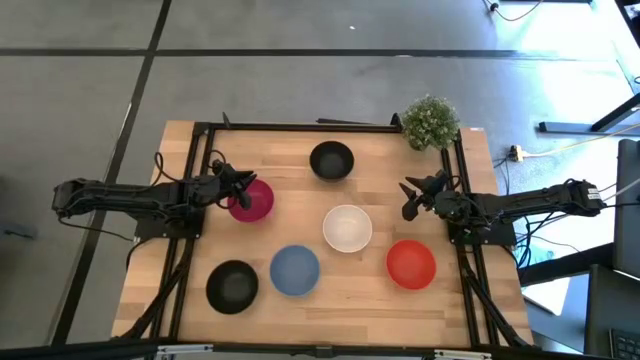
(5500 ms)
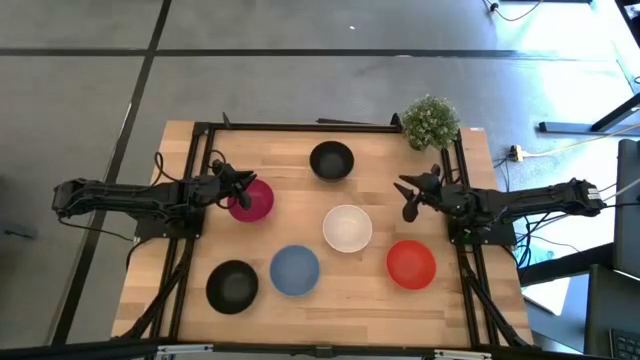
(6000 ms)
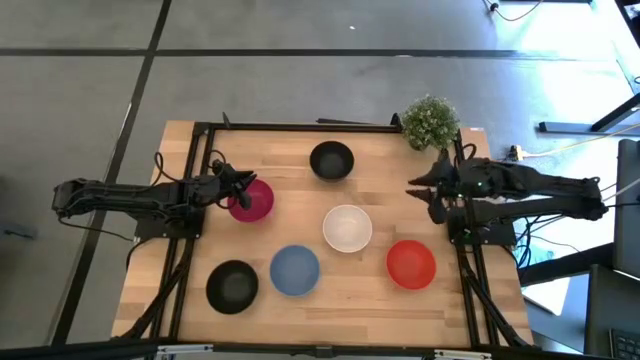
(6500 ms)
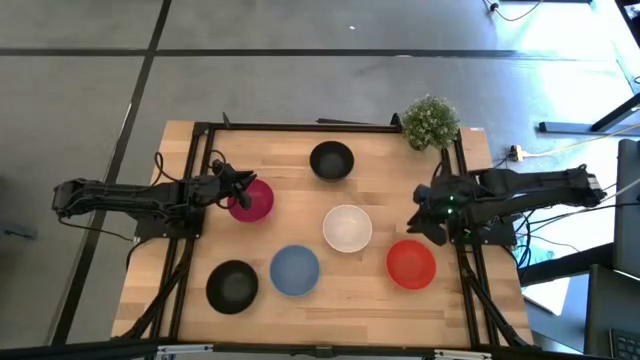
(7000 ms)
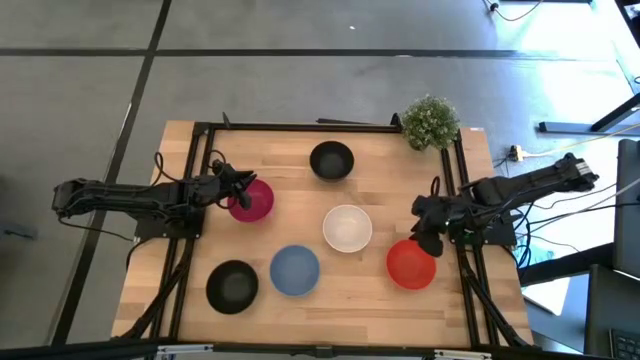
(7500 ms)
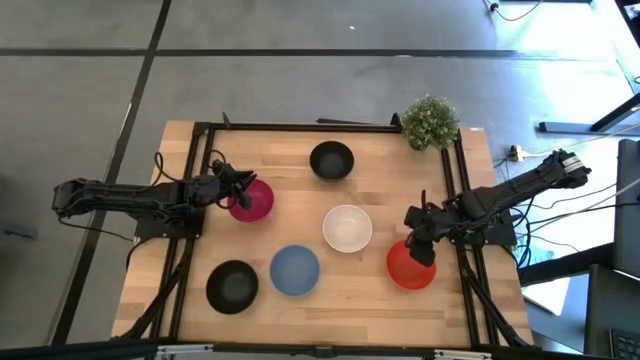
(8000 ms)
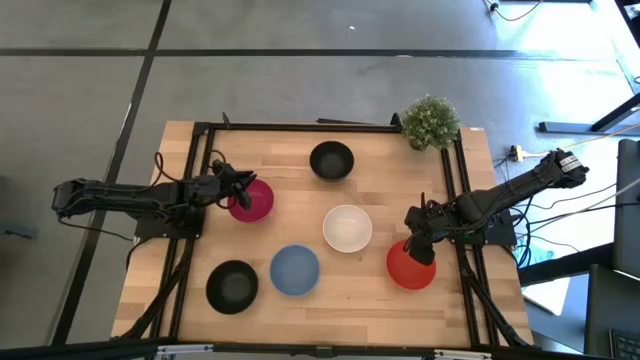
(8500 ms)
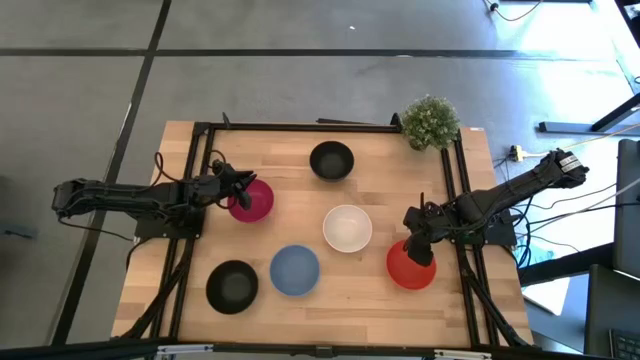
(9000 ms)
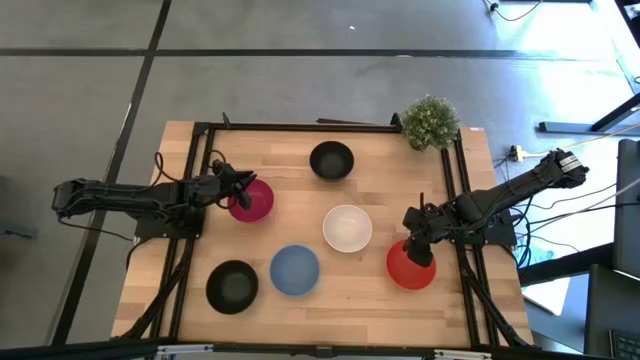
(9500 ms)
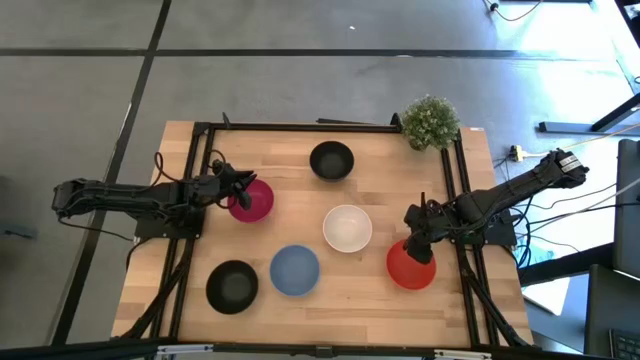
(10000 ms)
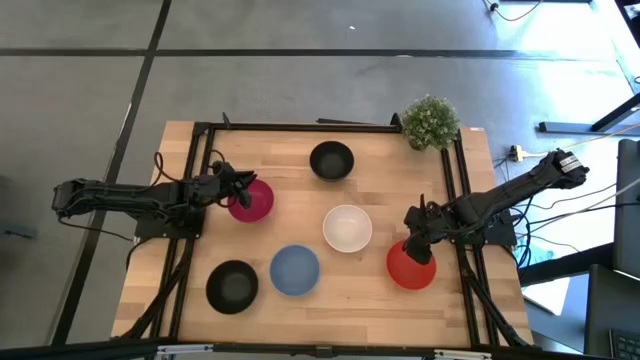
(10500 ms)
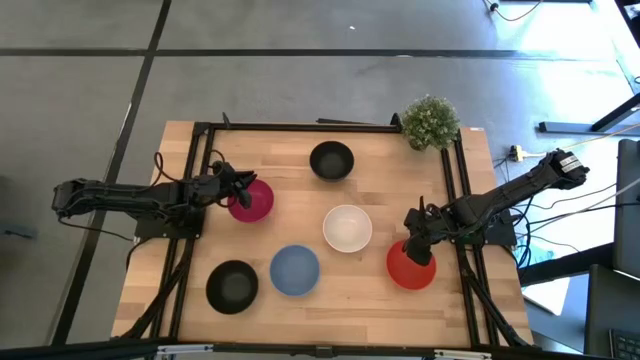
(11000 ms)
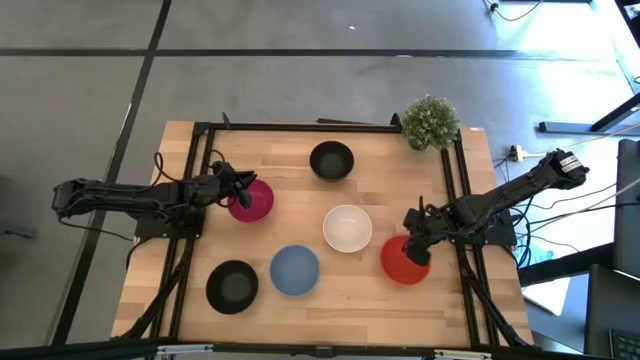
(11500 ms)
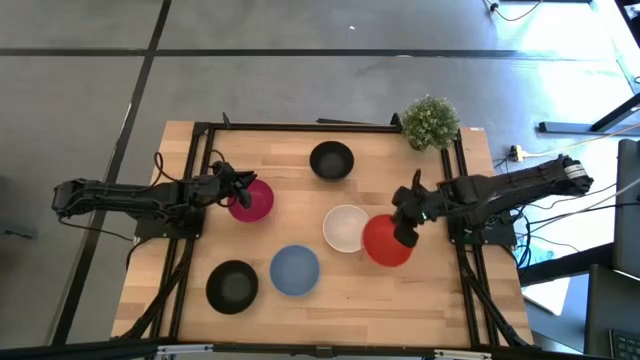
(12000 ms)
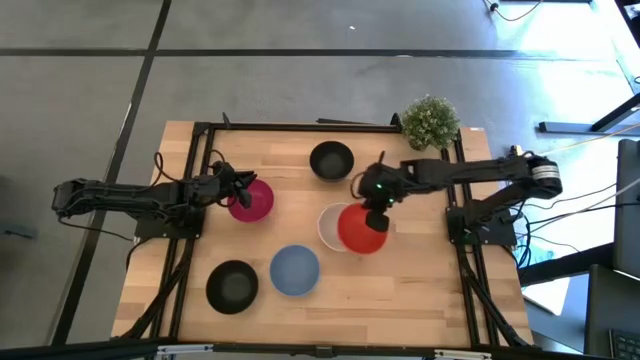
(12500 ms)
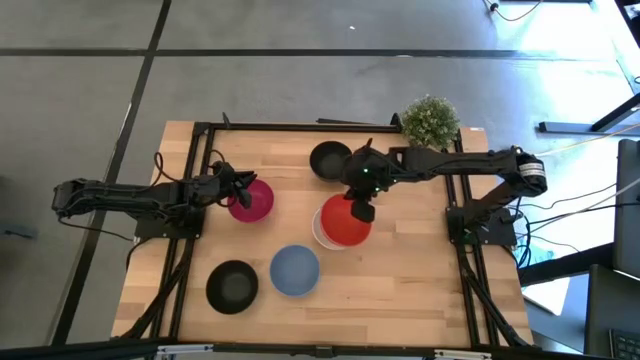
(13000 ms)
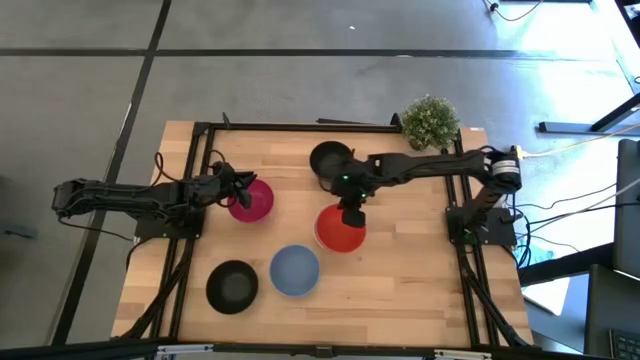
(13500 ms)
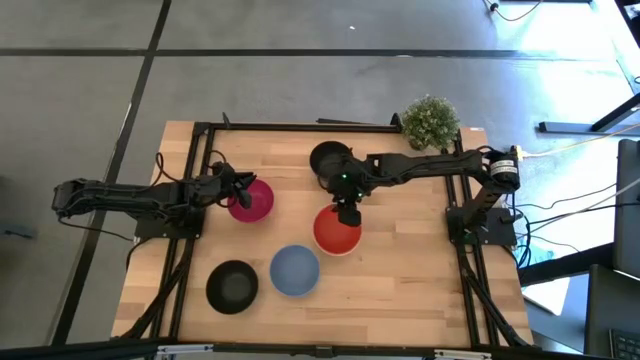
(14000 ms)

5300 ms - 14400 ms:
Task: Nest bowls inside each other
Stack the orange bowl on top of the white bowl

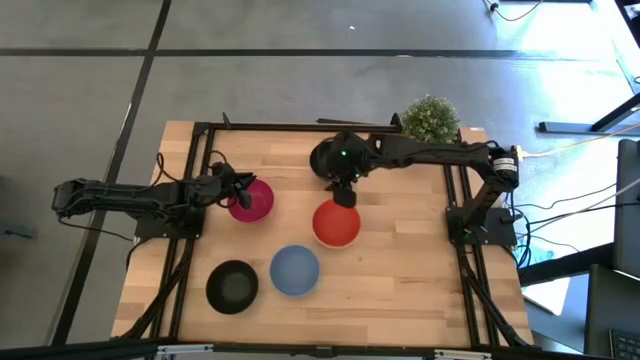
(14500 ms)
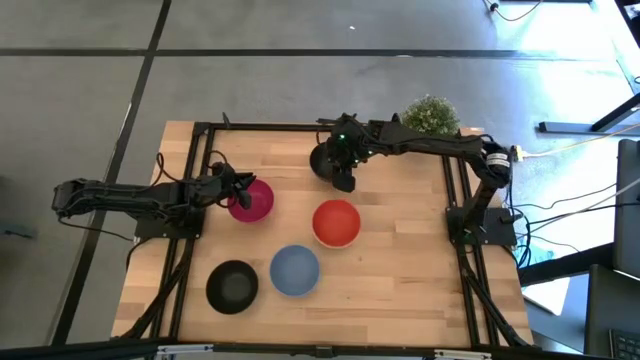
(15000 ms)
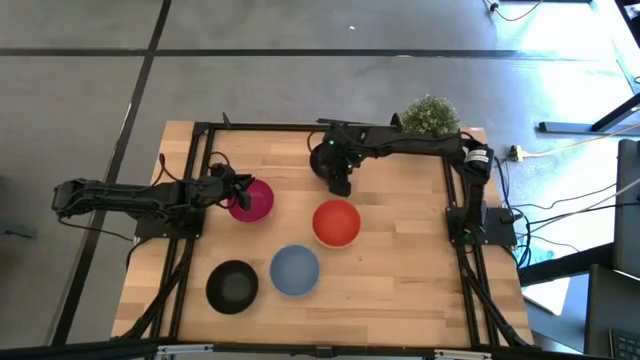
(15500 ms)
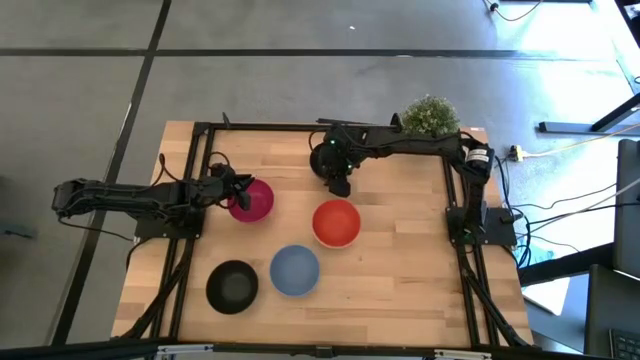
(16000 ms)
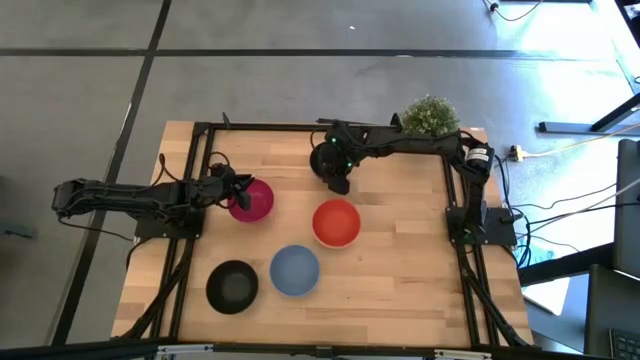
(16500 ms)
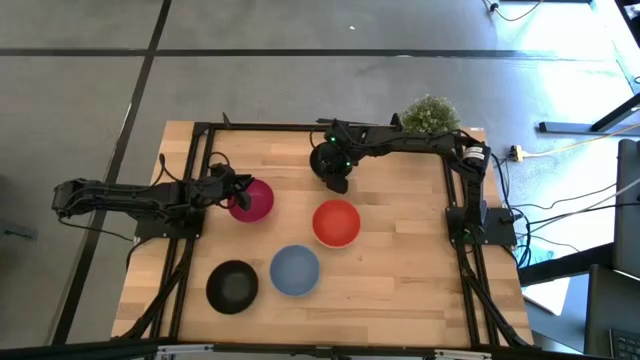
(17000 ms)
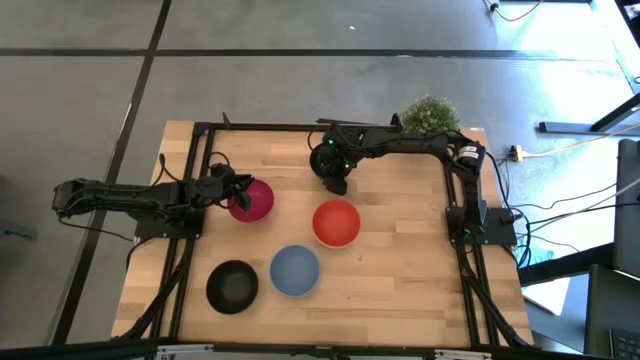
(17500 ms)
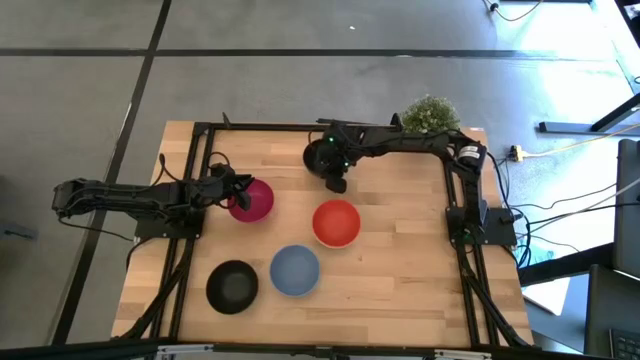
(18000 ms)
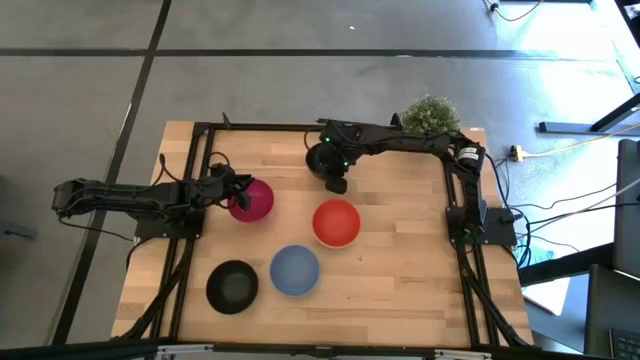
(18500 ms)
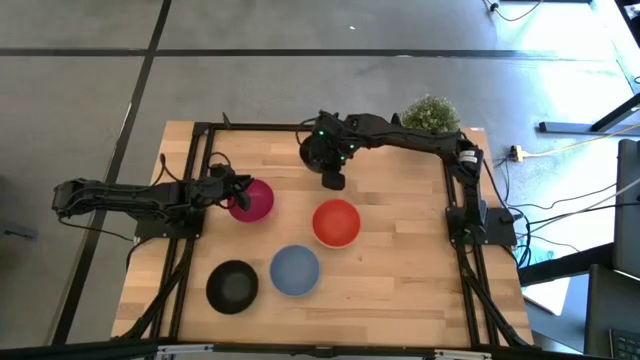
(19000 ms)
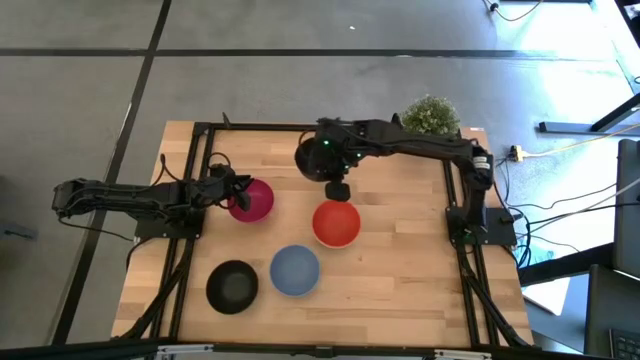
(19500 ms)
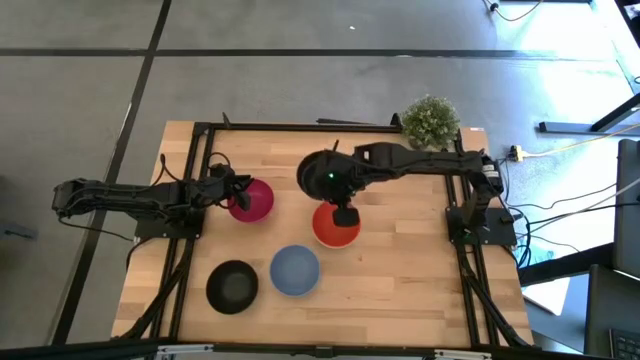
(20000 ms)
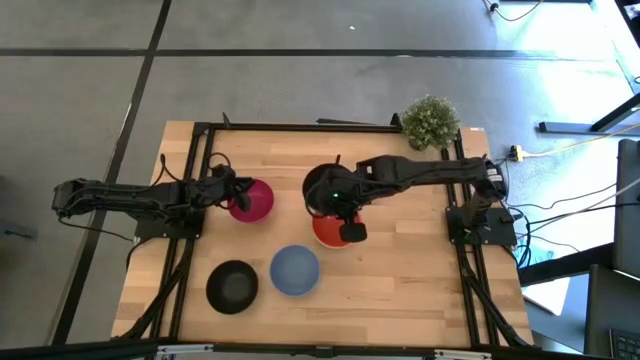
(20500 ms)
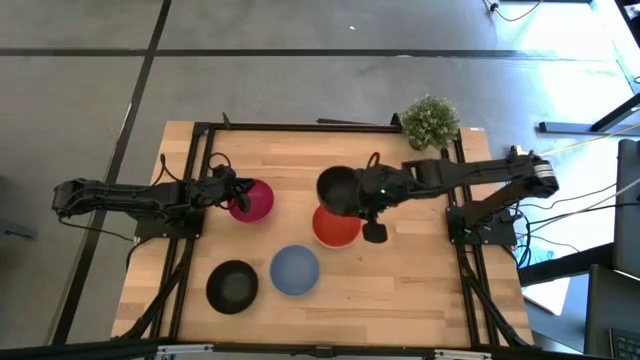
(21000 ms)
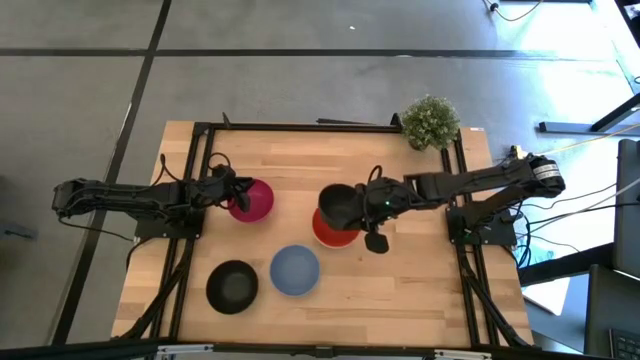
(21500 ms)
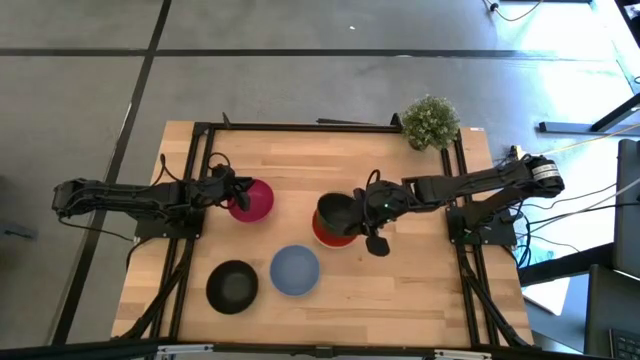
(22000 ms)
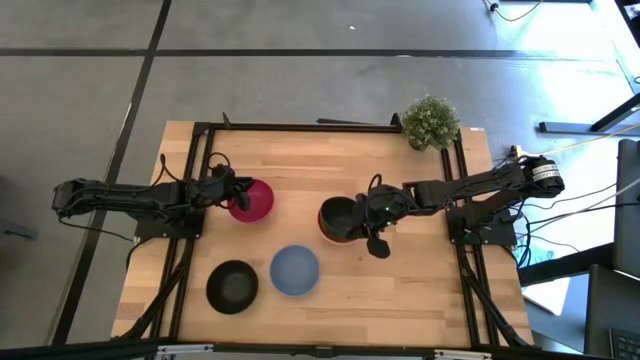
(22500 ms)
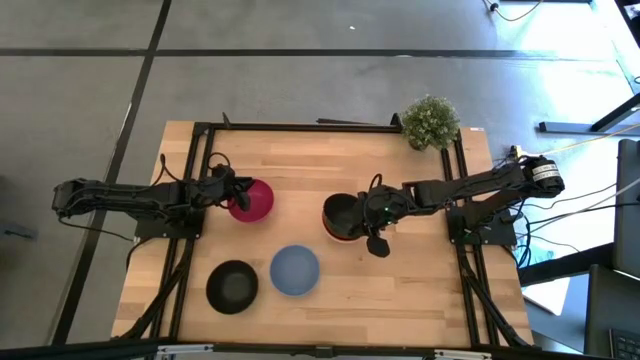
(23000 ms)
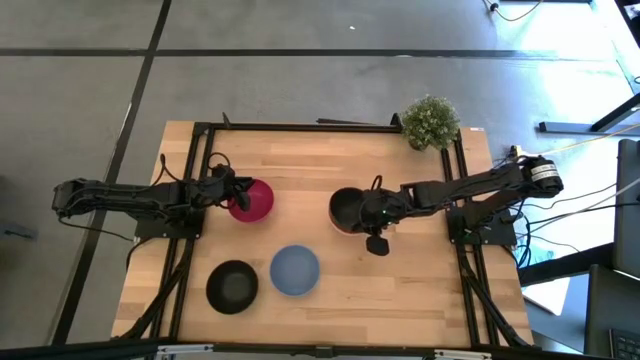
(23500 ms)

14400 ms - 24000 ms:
Stack the top black bowl on top of the orange bowl

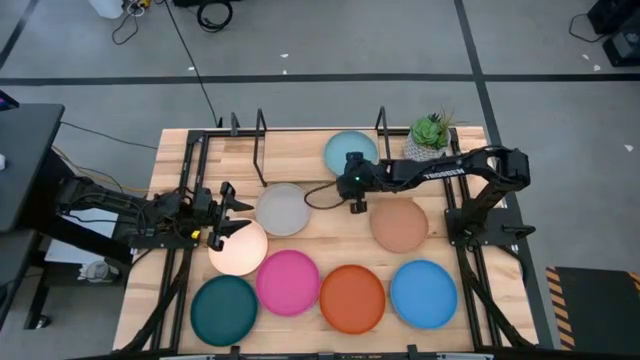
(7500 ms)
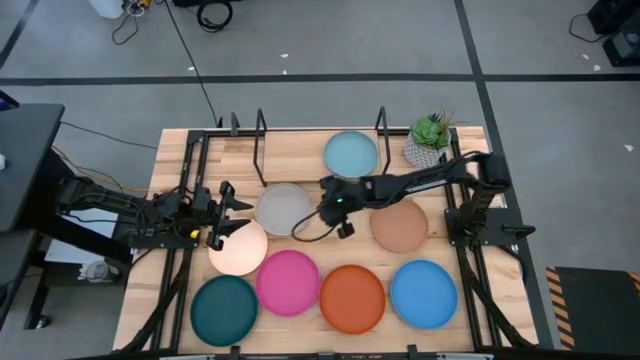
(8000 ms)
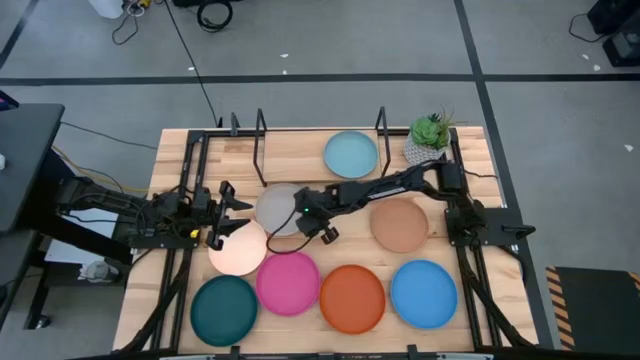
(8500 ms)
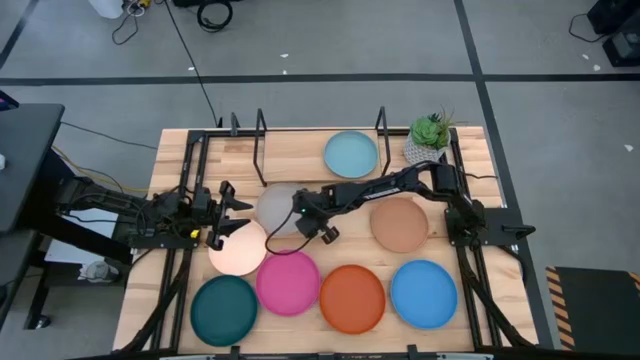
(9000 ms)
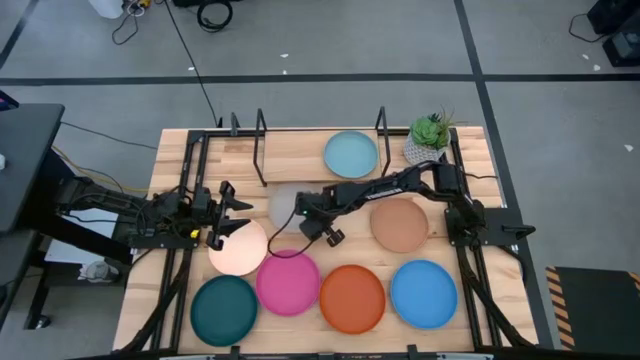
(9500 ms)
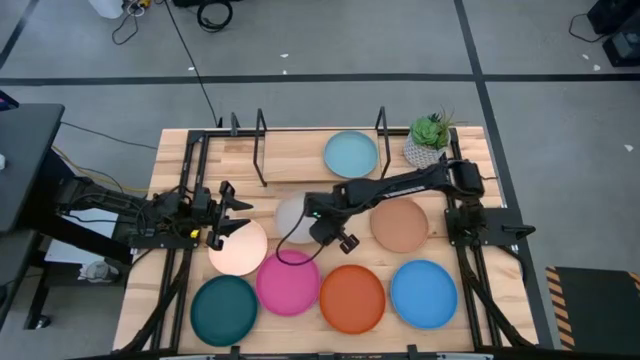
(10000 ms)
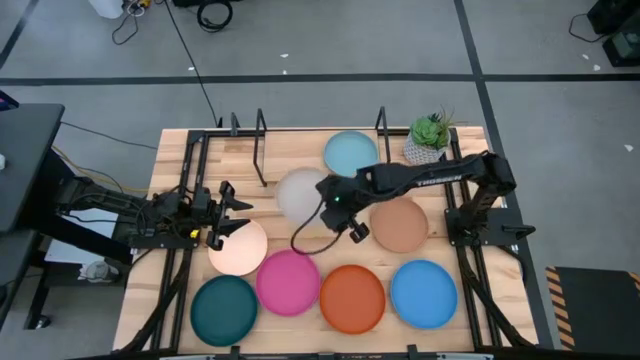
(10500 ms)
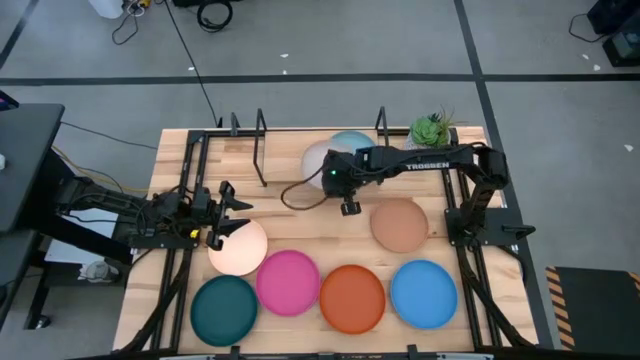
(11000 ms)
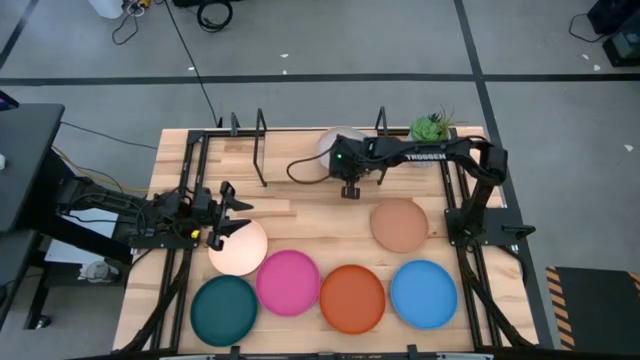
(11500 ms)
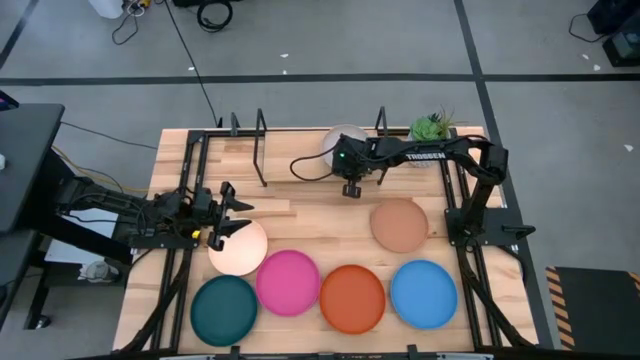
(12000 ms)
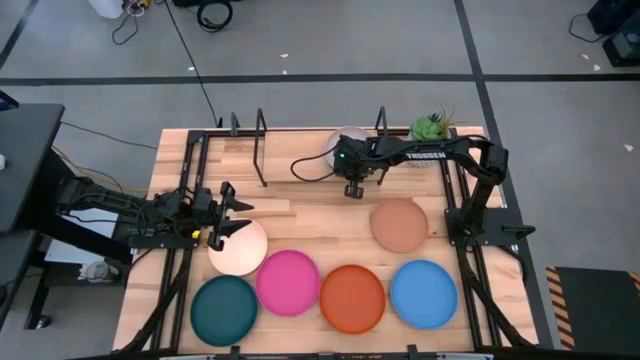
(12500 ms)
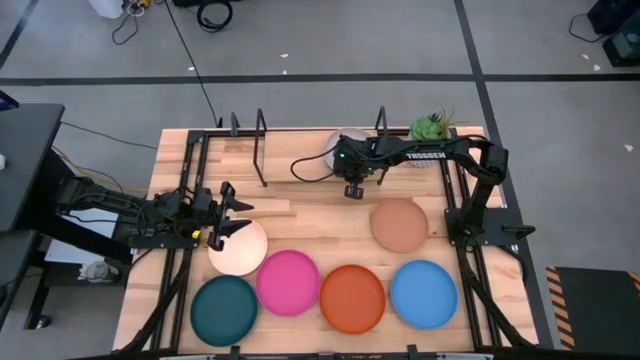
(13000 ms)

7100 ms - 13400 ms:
Task: Place and stack plates onto a shelf
Stack the gray plate on top of the light blue plate on the shelf
